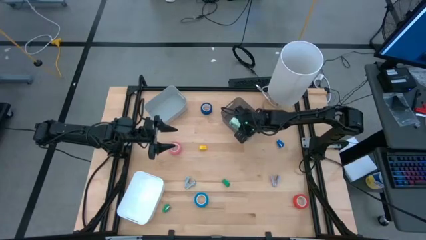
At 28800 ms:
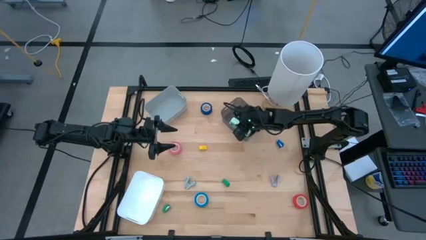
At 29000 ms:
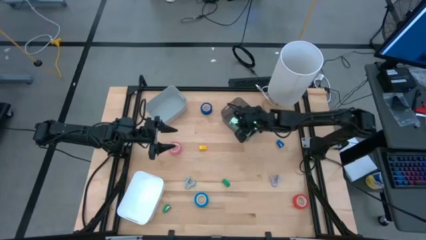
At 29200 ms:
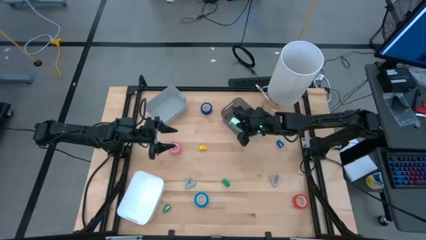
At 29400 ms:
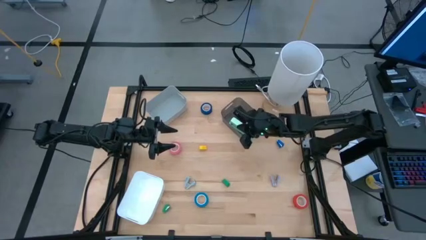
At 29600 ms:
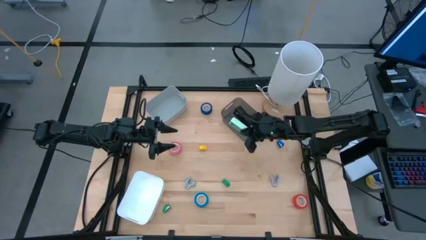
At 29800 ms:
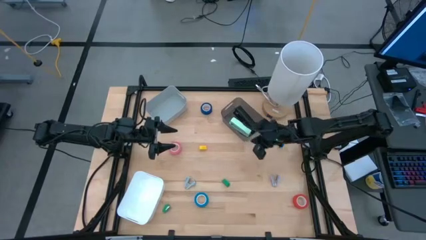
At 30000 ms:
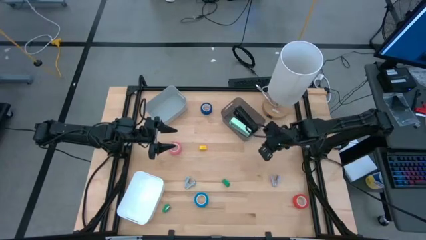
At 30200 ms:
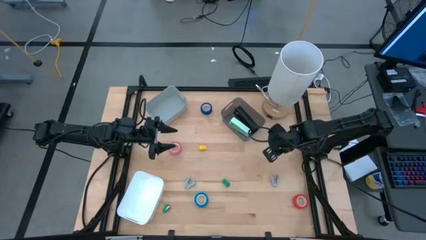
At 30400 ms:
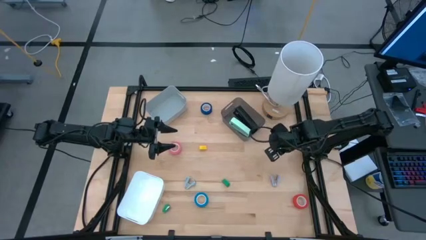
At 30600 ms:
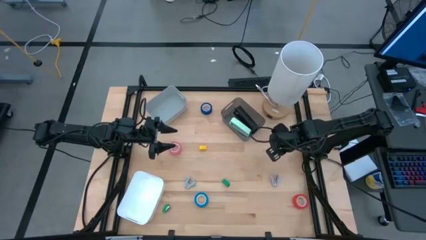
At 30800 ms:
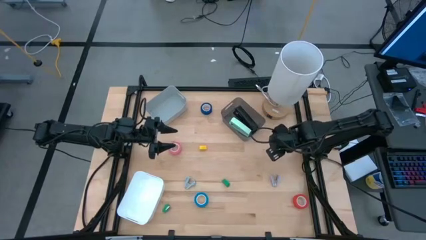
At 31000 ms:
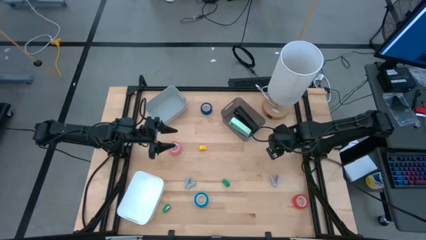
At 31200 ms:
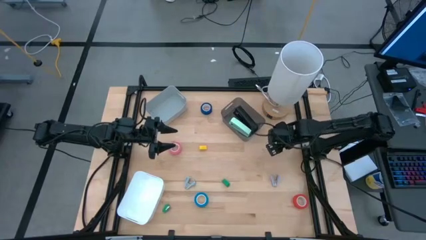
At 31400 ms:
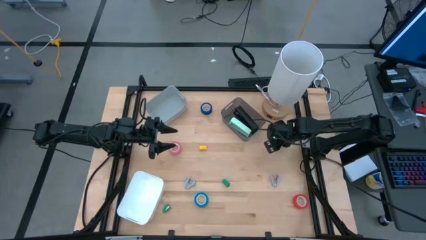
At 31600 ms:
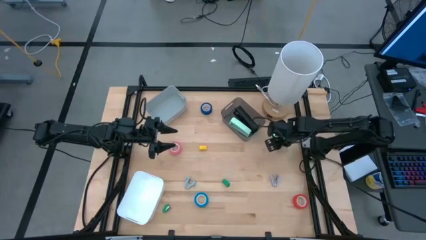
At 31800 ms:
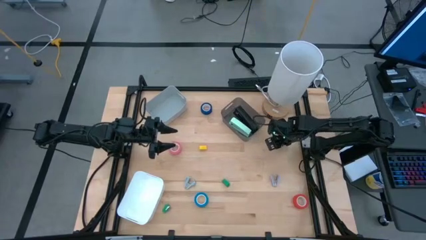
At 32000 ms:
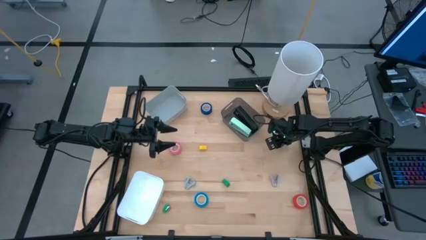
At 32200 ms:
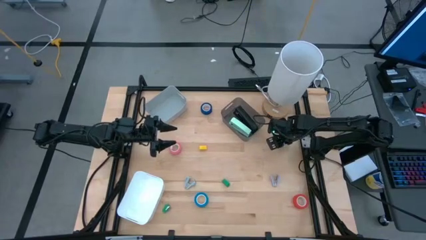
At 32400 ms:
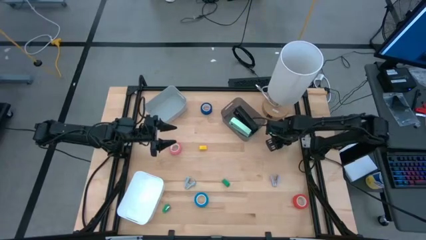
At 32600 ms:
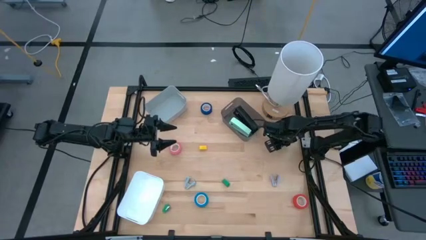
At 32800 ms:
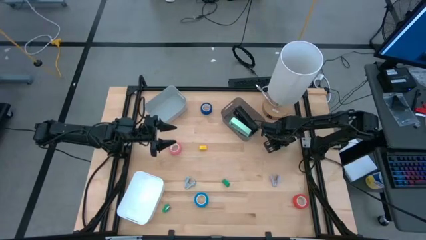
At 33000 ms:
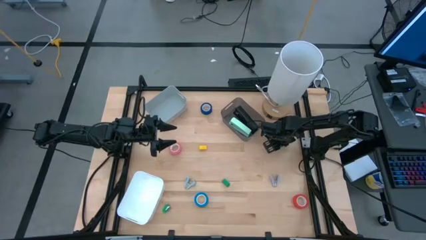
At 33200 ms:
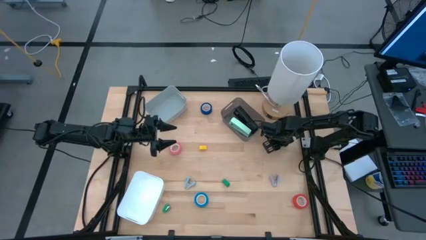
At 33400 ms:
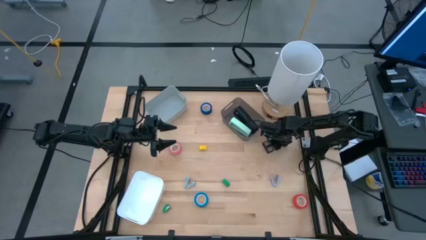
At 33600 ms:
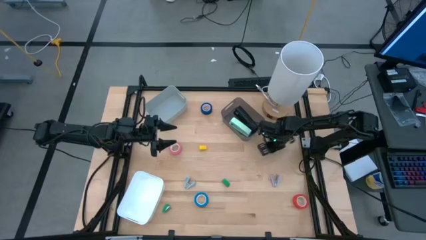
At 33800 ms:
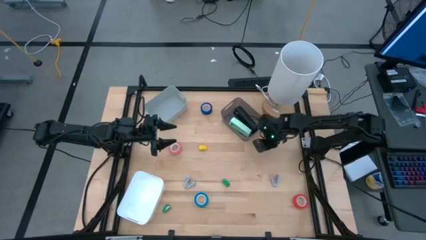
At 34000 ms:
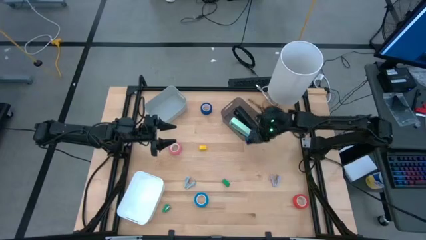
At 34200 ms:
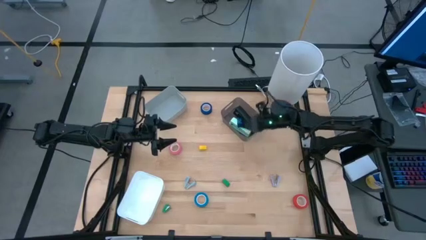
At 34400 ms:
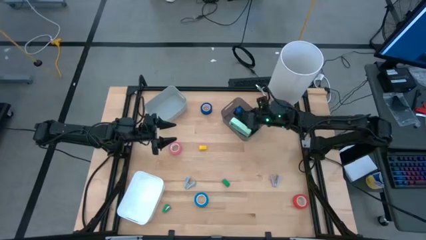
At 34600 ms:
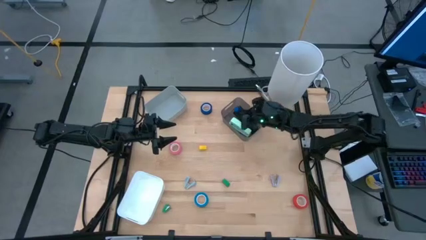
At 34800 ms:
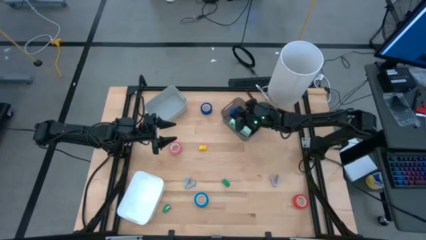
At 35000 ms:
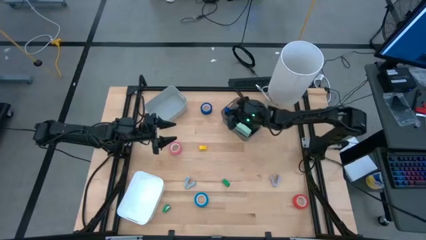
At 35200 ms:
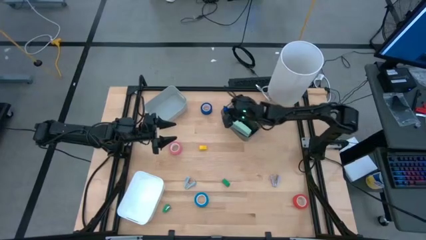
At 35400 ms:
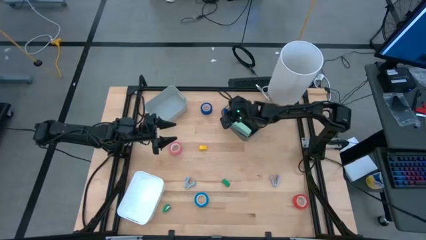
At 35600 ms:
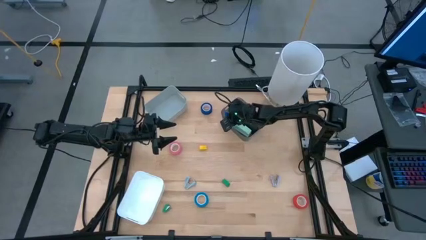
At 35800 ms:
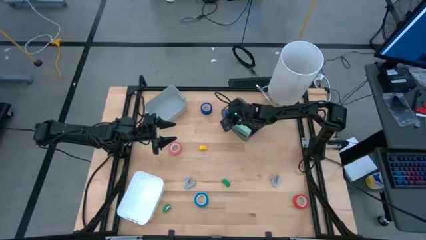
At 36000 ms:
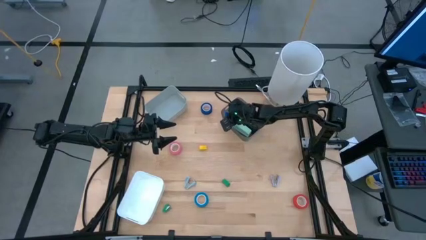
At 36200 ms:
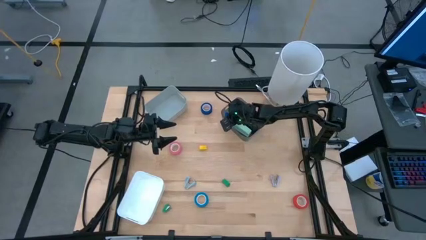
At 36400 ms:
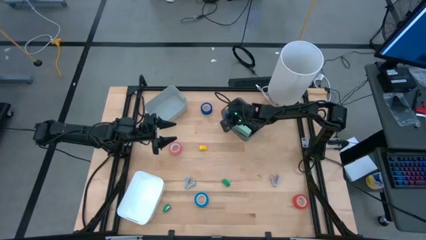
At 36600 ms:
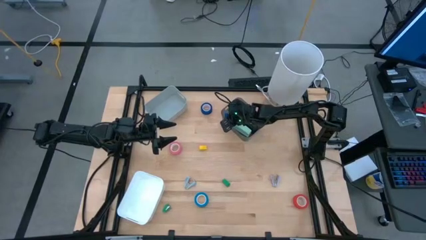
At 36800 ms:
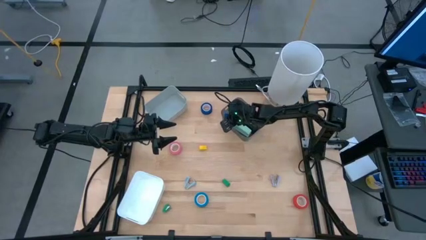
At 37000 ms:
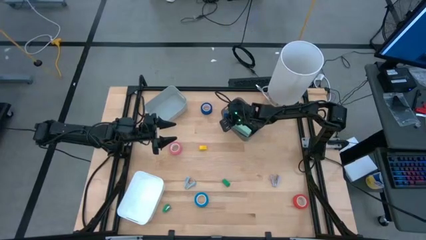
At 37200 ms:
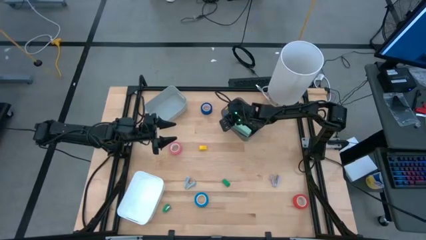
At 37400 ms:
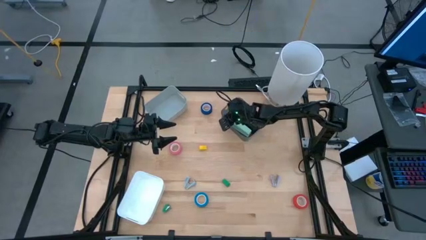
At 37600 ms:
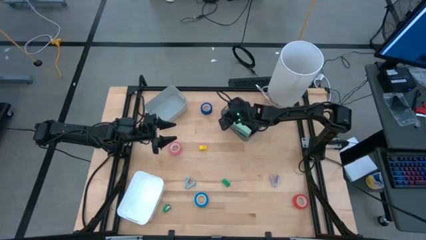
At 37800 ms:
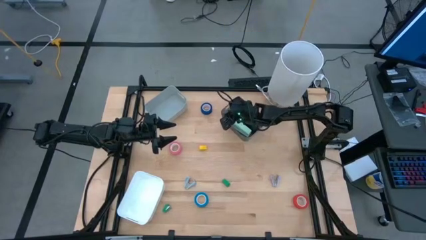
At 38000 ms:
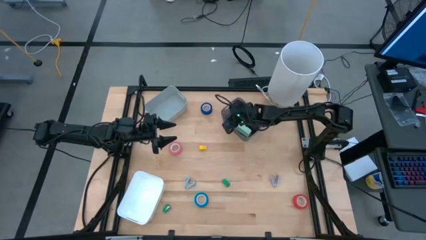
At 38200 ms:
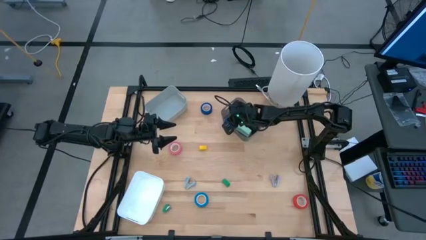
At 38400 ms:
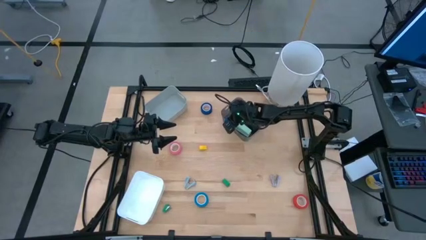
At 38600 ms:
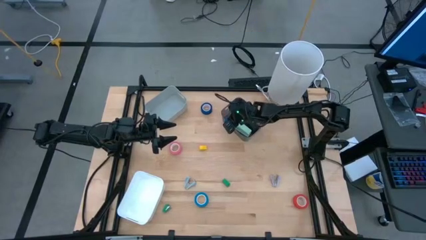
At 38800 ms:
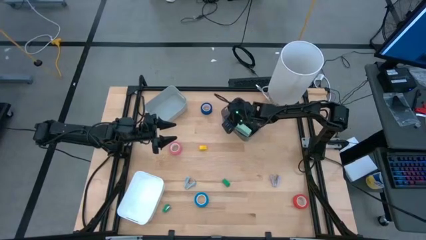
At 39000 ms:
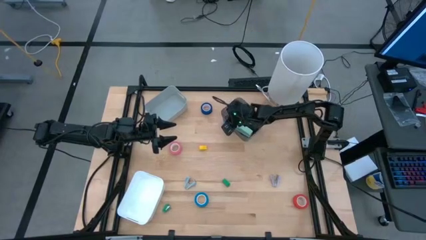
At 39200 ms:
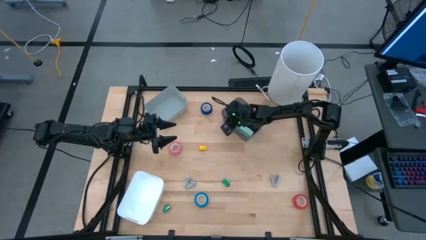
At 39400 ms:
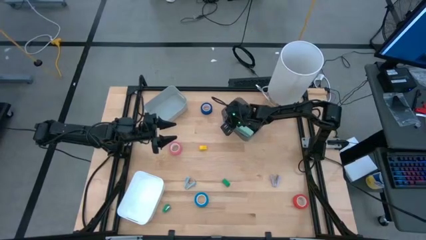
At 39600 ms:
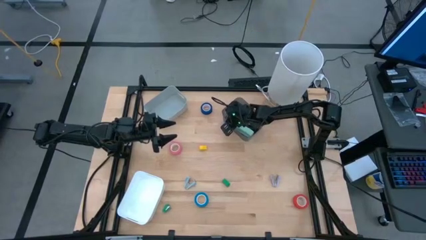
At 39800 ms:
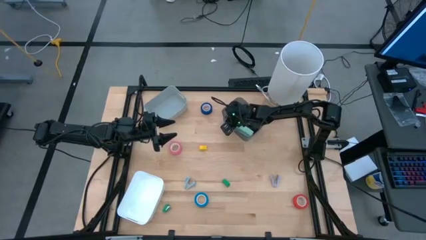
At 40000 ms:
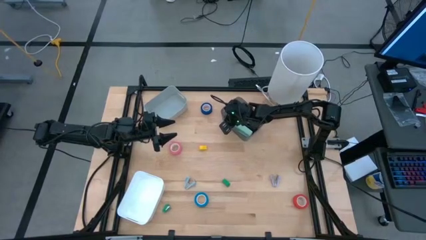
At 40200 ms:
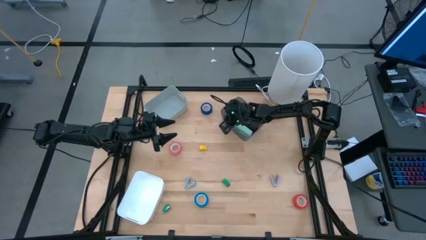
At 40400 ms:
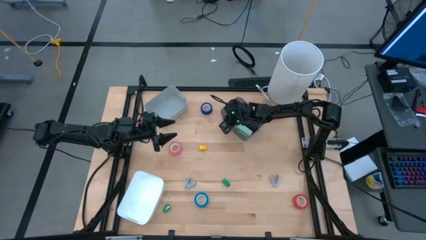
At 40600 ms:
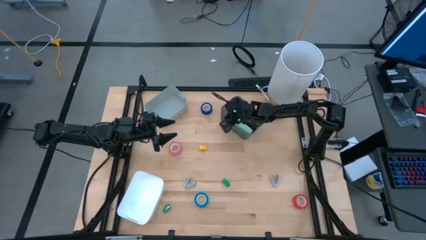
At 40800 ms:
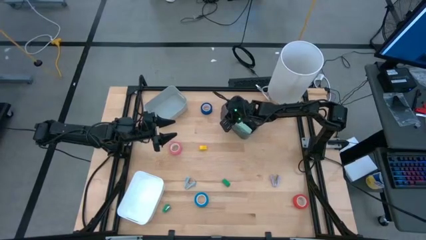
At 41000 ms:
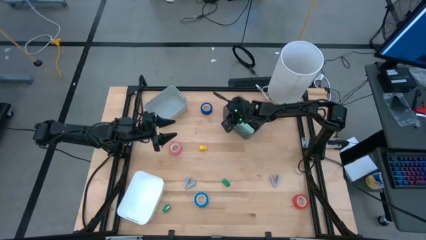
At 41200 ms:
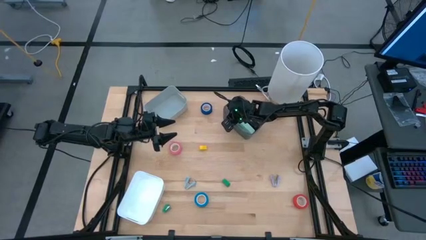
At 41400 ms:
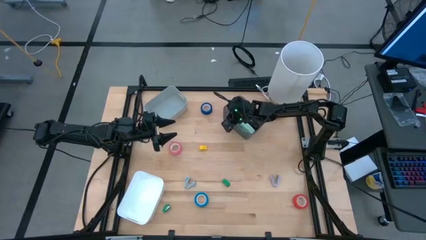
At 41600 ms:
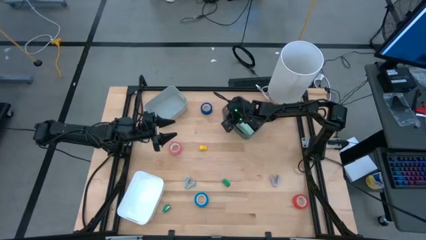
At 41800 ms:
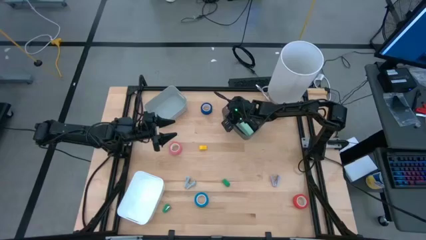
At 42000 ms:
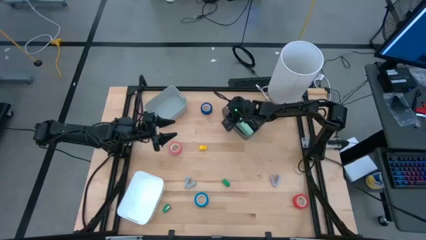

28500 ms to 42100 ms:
Task: Pick and place Stapler, Stapler remover, tape
Put the blue stapler into the black bin
